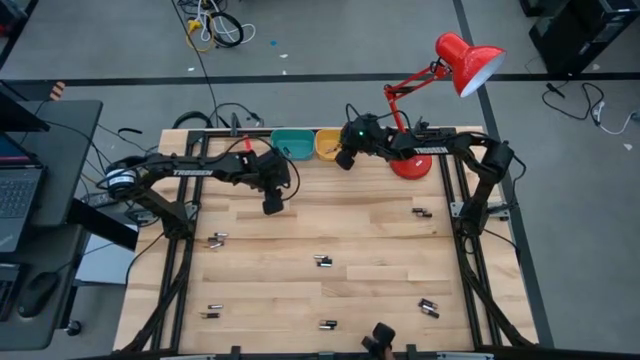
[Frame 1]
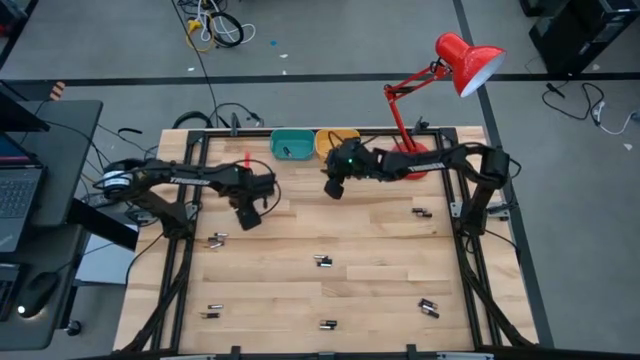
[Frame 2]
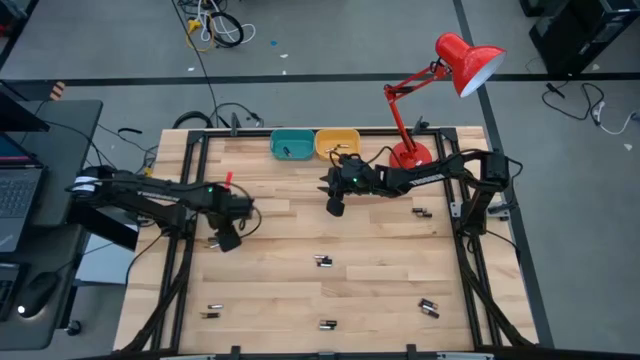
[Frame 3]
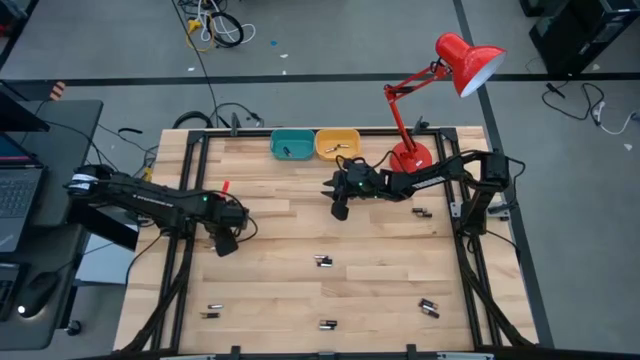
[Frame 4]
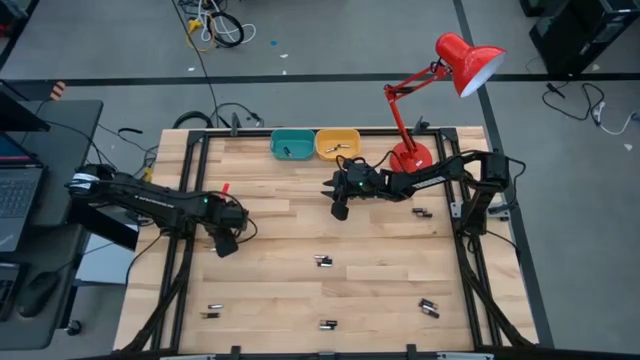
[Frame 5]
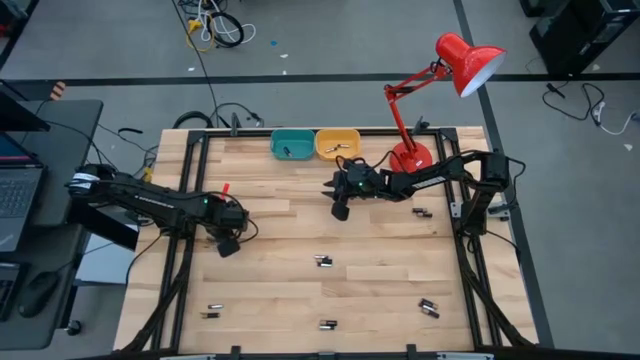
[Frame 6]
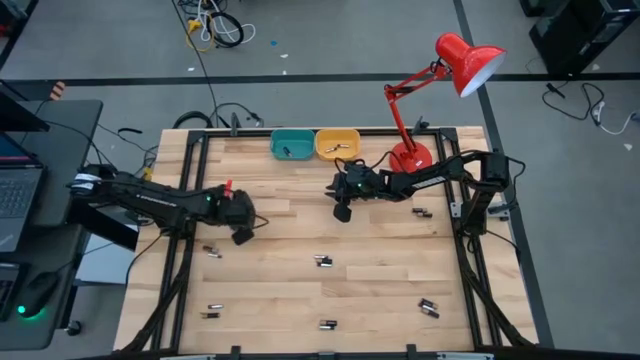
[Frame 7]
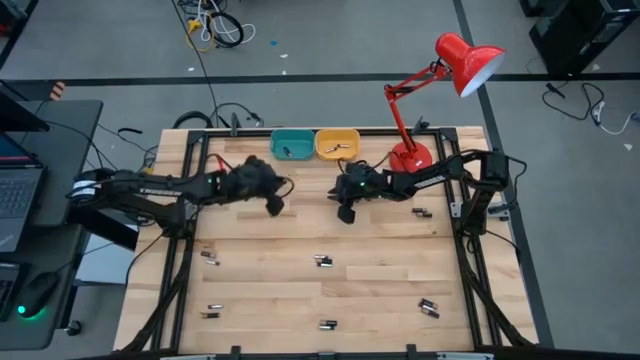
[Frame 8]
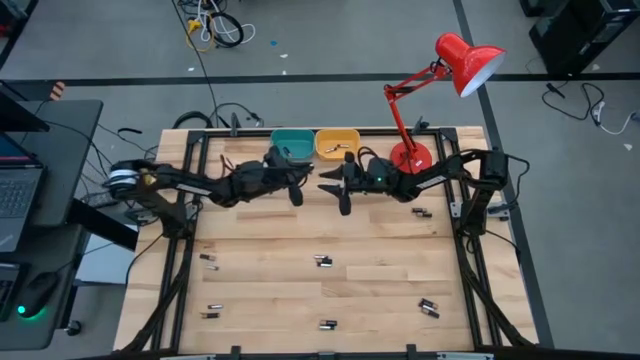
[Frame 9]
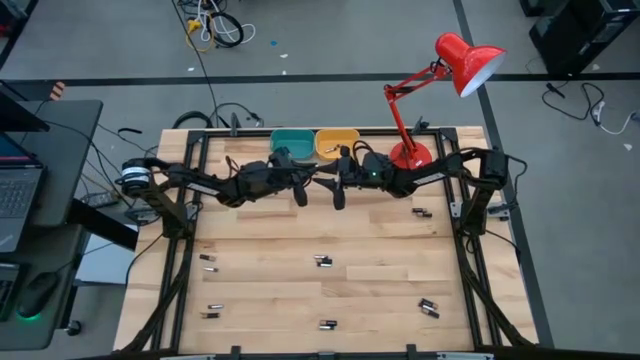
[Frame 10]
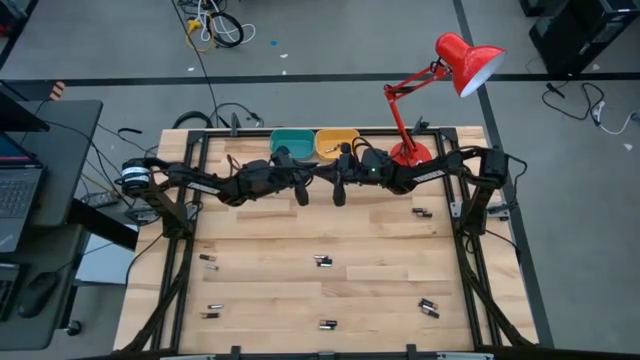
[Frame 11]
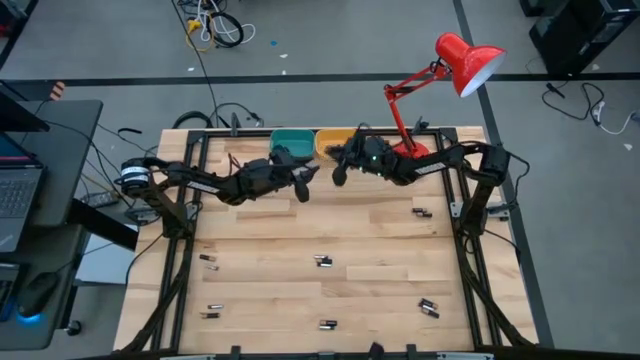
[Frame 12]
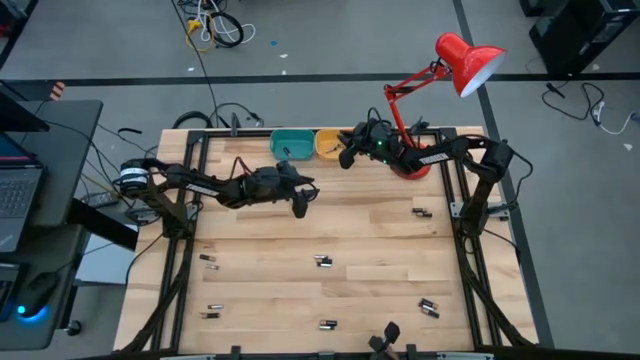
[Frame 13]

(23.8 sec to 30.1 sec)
Task: Sort batteries
Put the white battery into the yellow bin

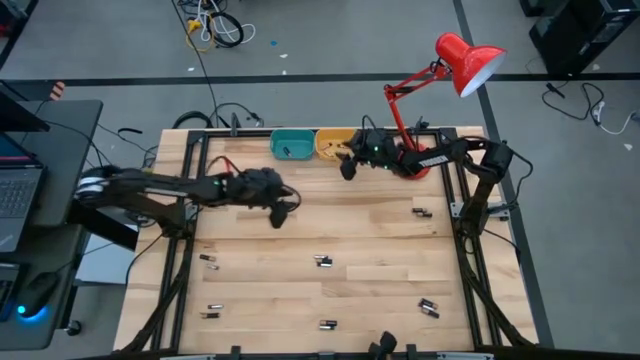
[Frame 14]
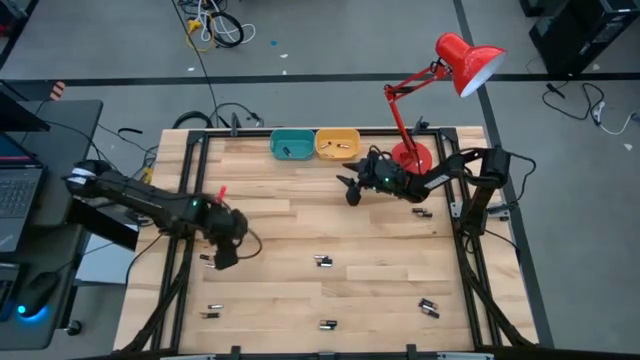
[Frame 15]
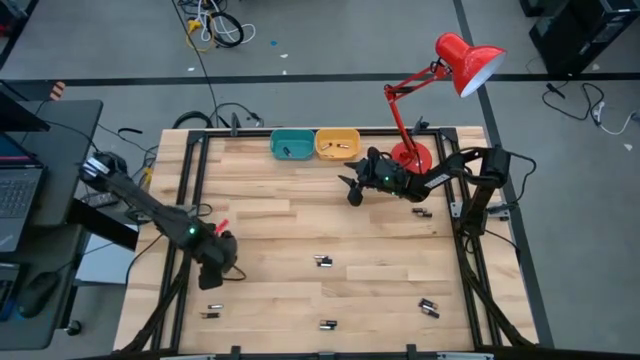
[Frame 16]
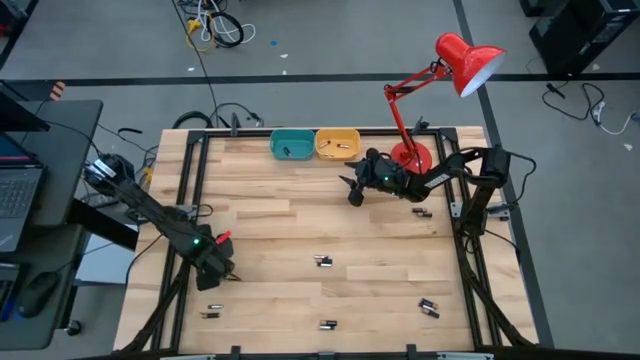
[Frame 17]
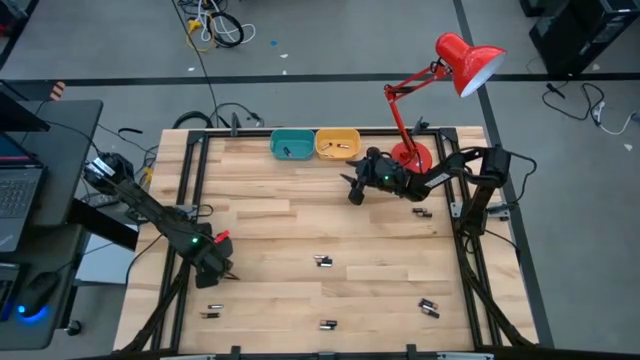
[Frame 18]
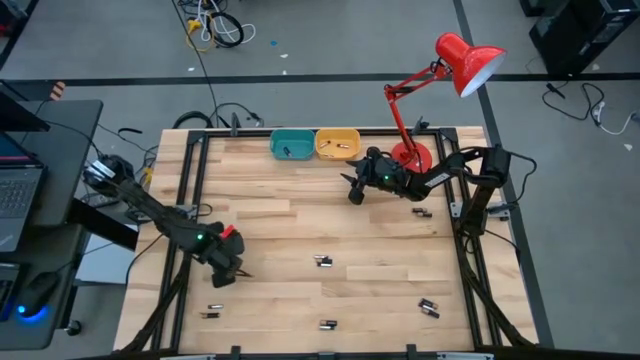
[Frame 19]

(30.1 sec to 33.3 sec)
Put the black battery into the blue bin

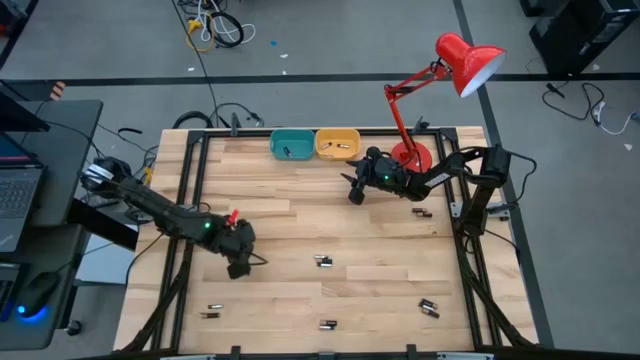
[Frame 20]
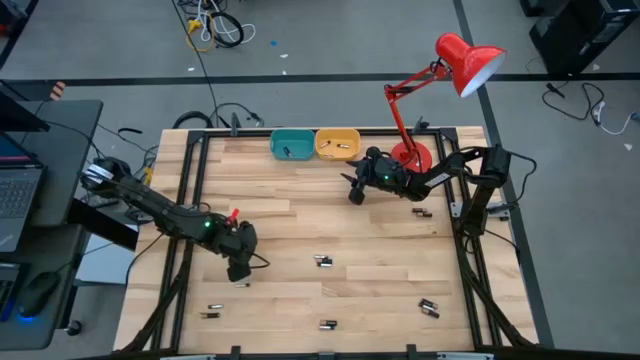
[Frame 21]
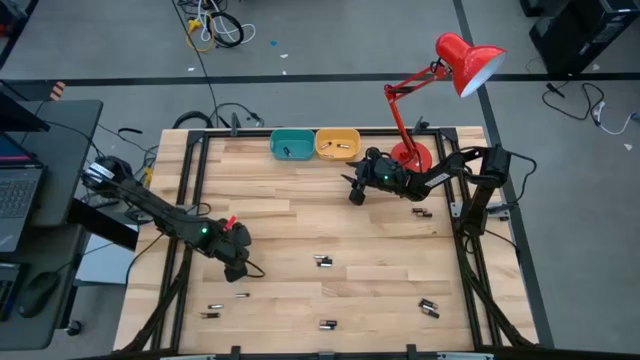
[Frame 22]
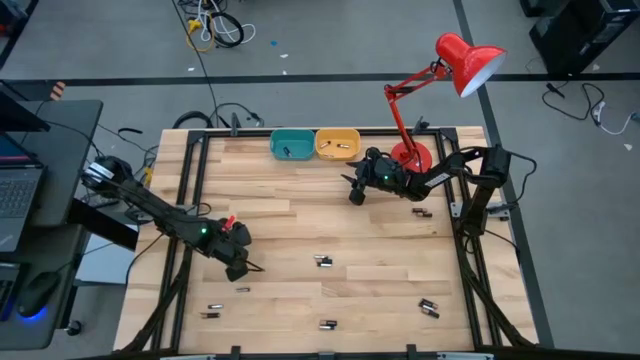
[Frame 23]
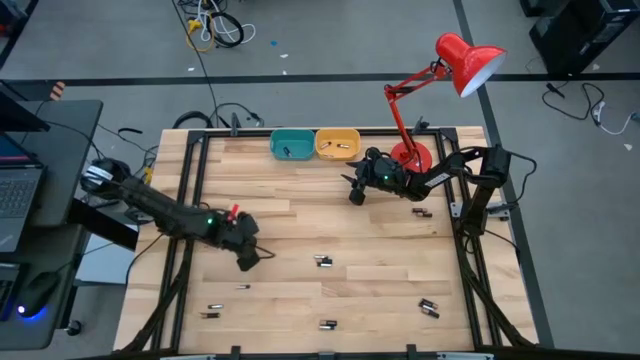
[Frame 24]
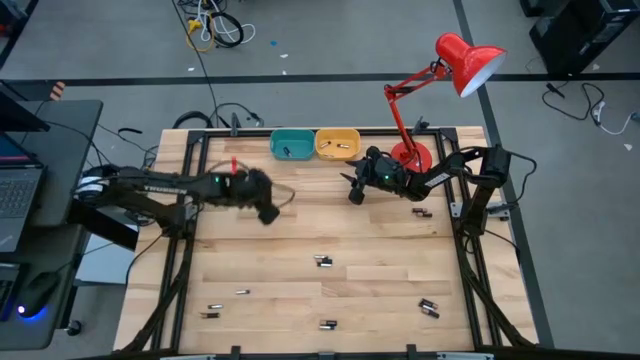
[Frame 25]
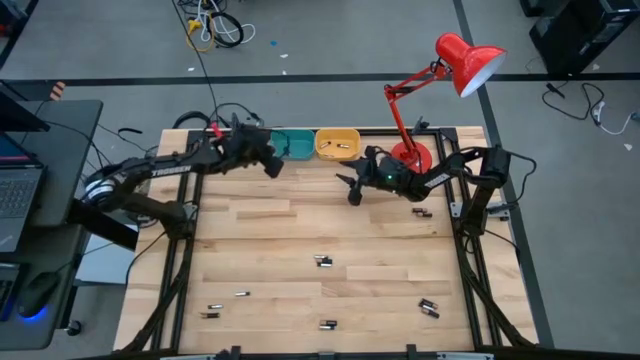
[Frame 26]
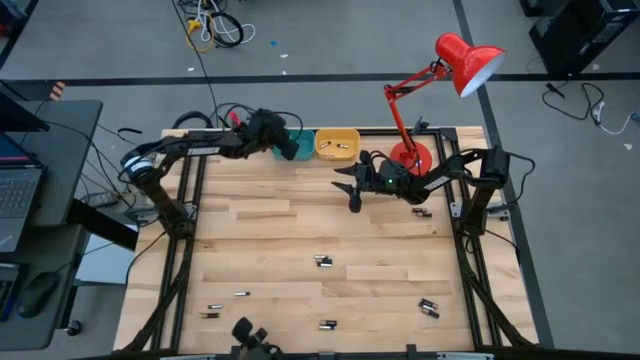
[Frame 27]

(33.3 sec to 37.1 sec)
Put the black battery into the blue bin

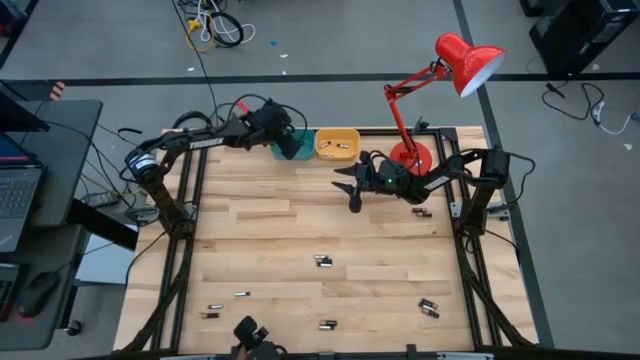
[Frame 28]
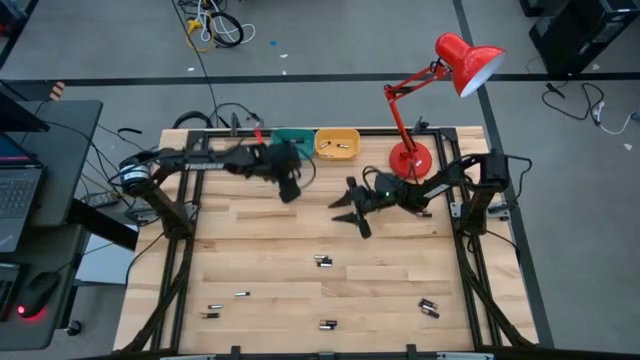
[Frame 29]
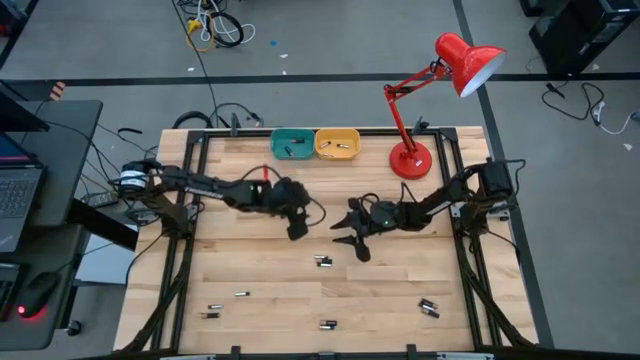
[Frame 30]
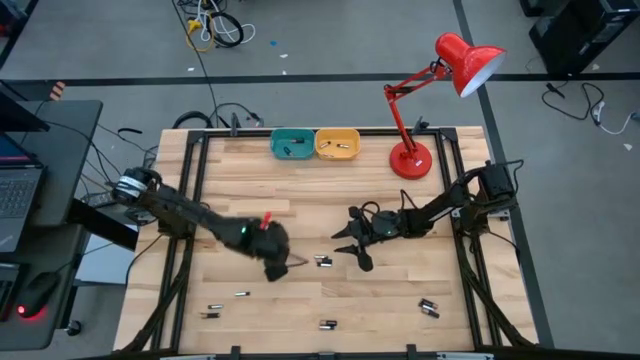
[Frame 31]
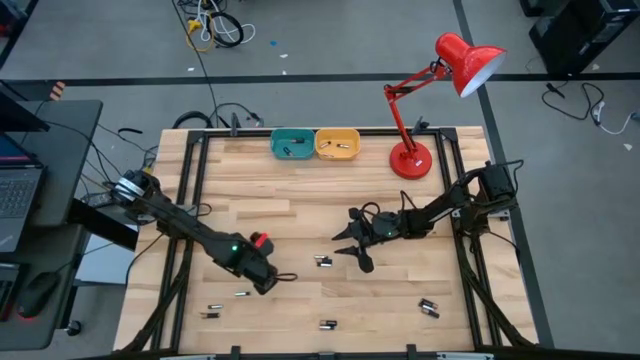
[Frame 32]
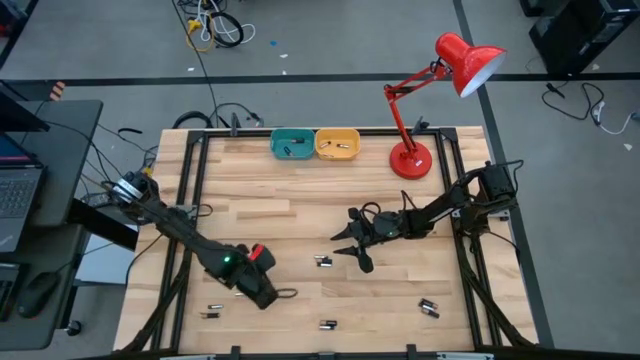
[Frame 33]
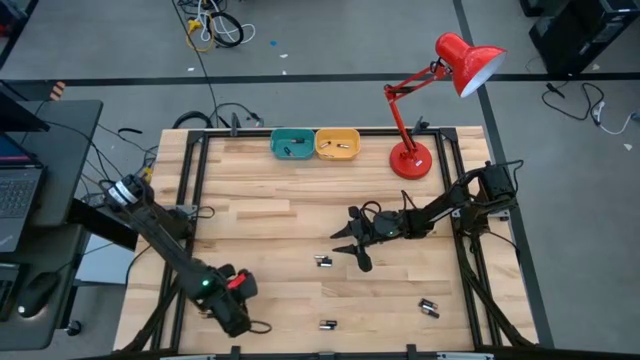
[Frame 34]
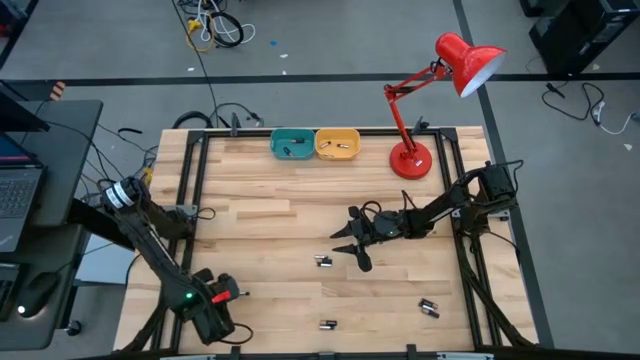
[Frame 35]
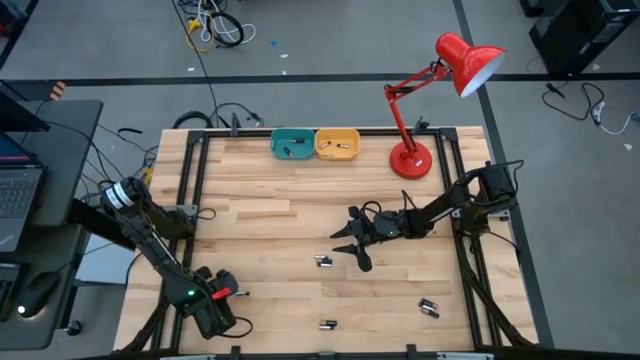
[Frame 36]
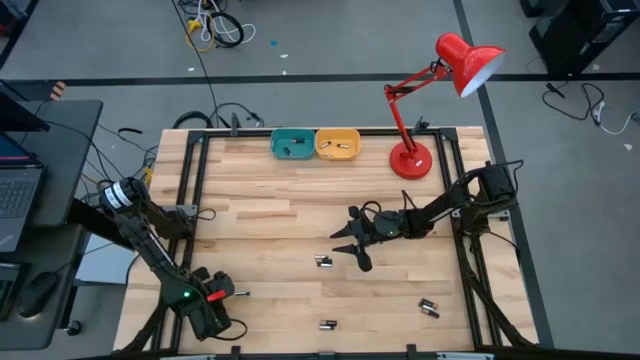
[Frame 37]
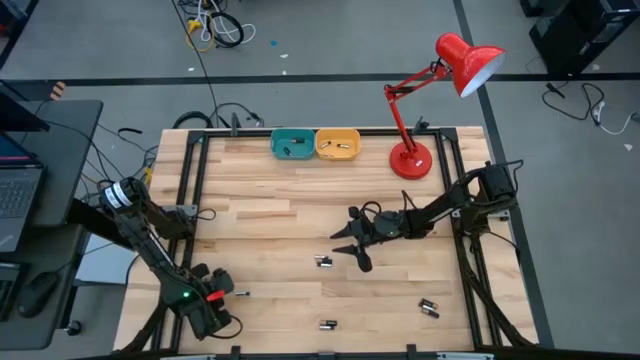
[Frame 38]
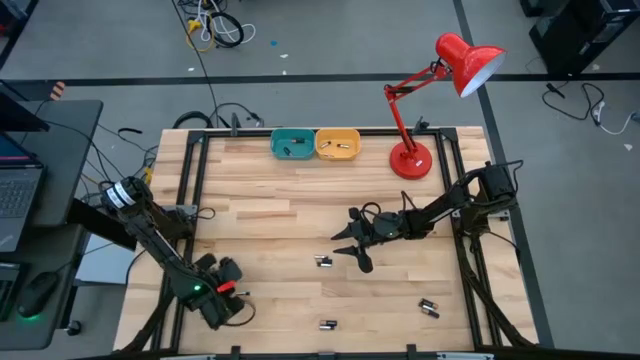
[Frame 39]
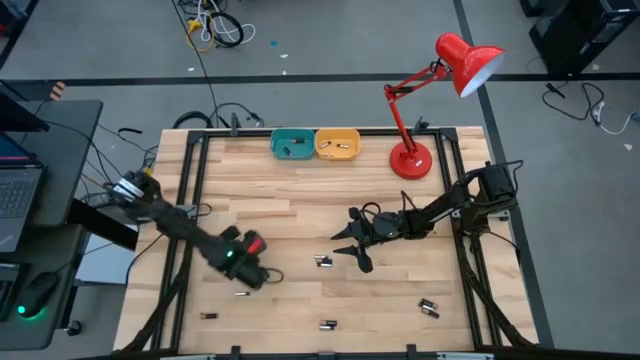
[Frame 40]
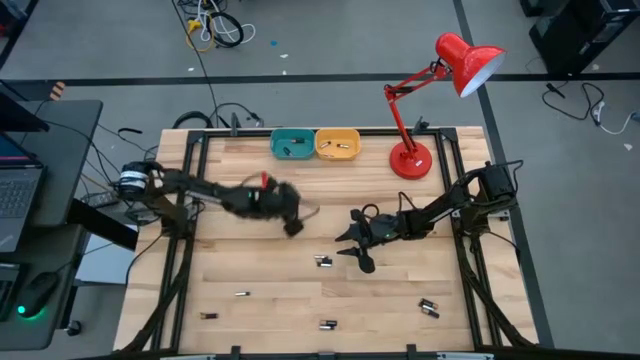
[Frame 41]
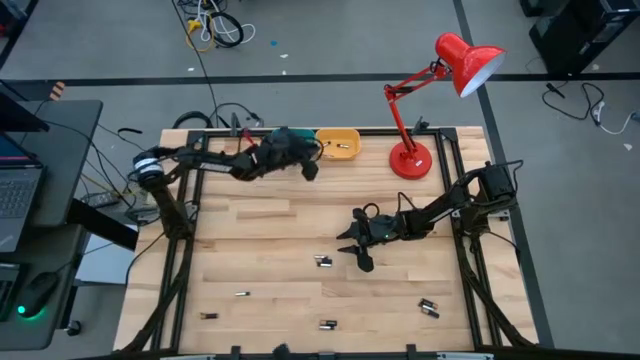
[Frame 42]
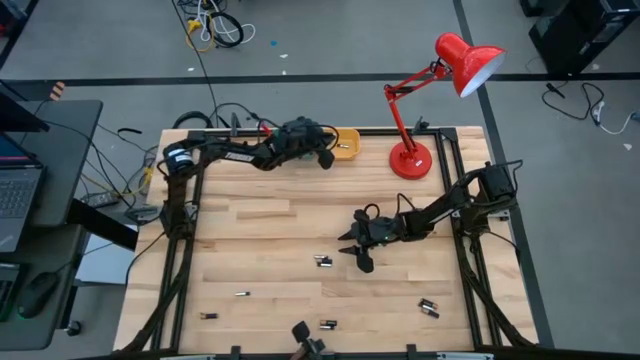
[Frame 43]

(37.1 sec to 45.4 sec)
Put the white battery into the yellow bin

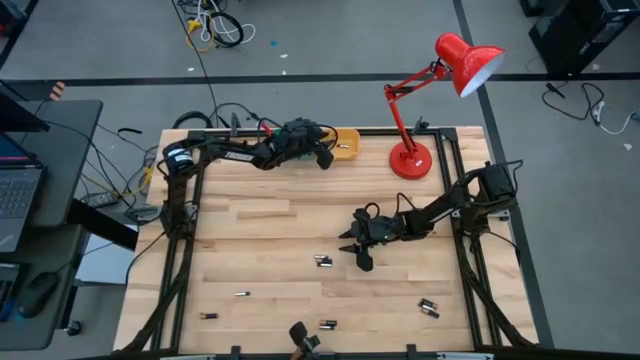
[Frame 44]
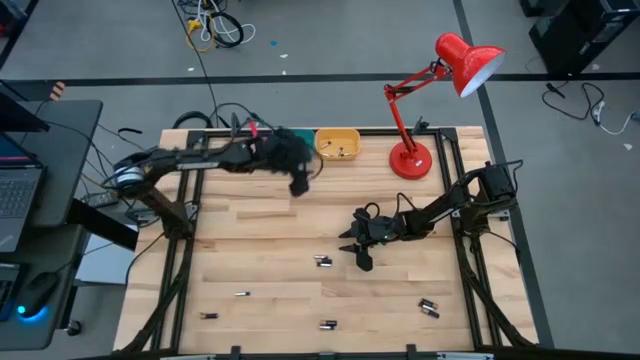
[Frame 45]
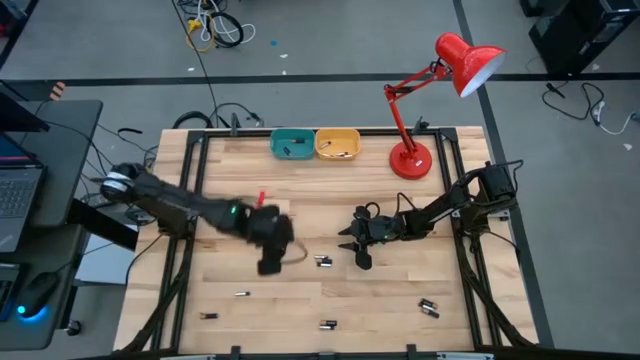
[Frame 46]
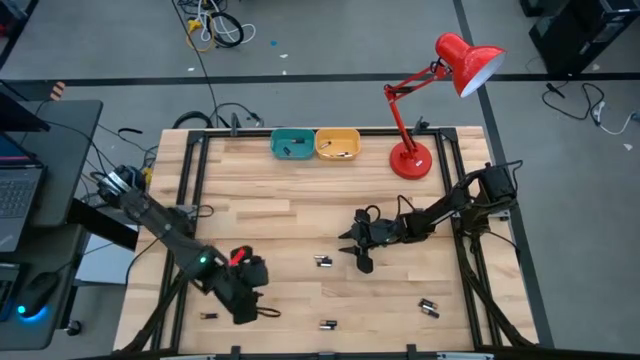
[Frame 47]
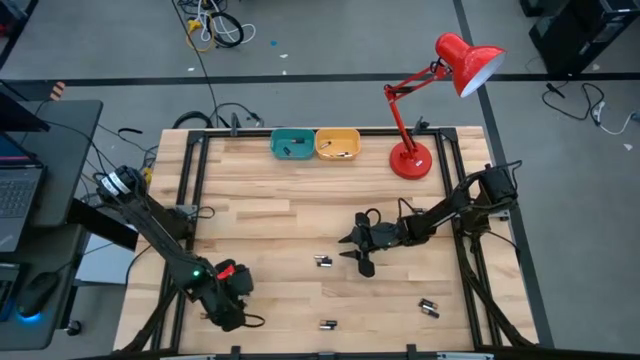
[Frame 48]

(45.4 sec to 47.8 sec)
Put the white battery into the yellow bin
